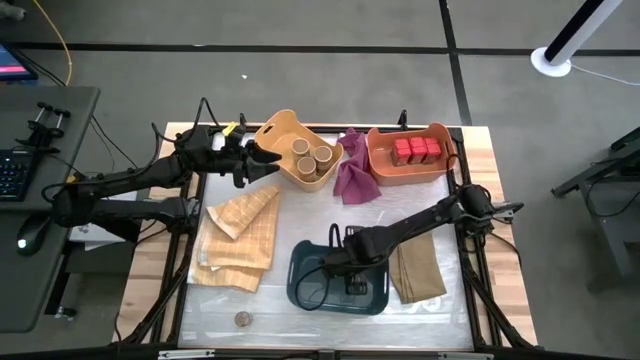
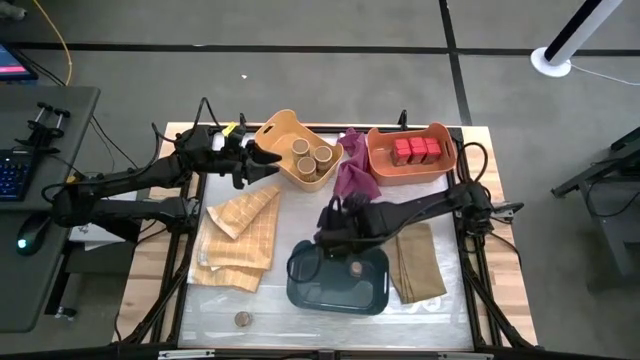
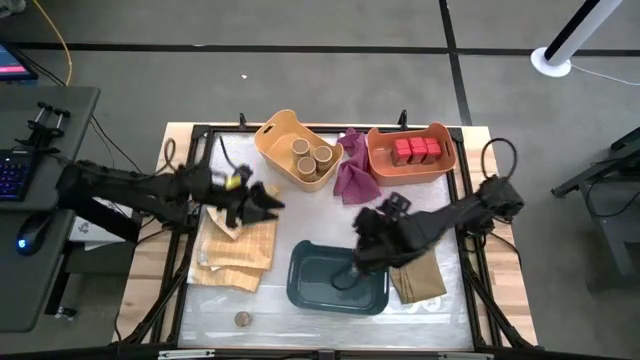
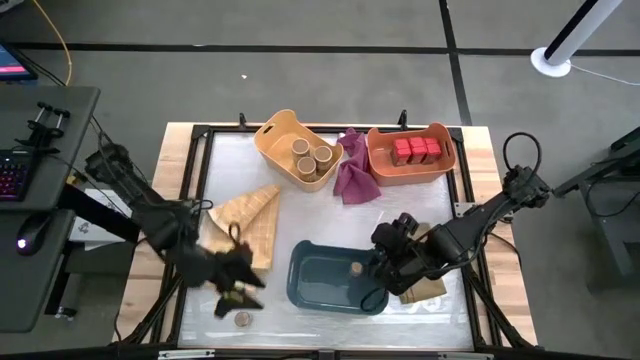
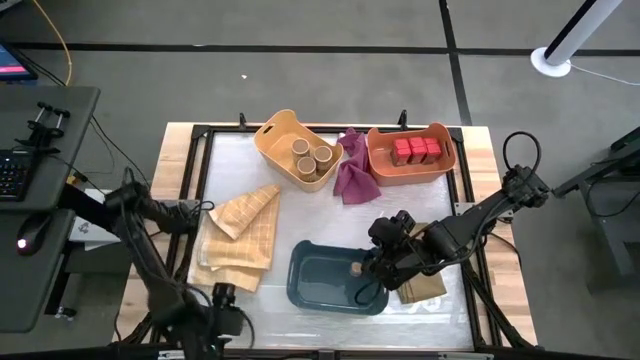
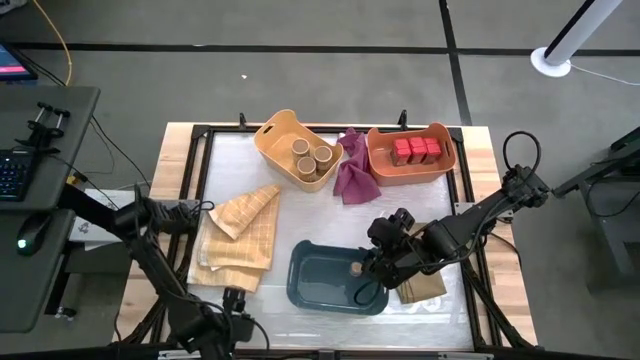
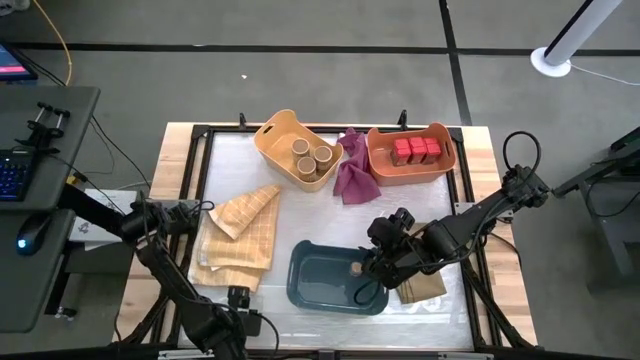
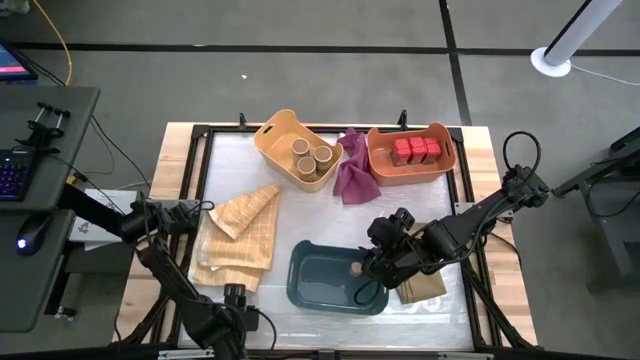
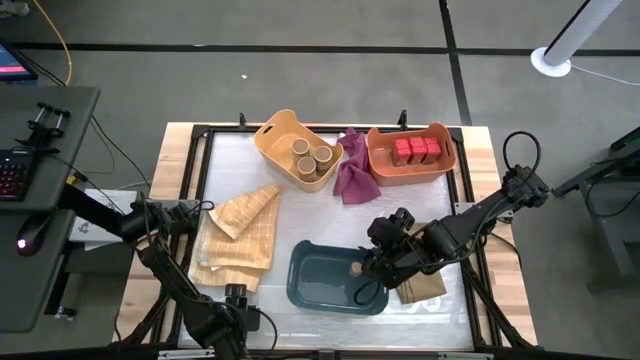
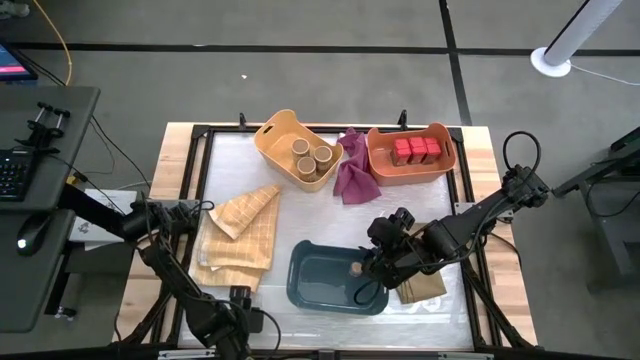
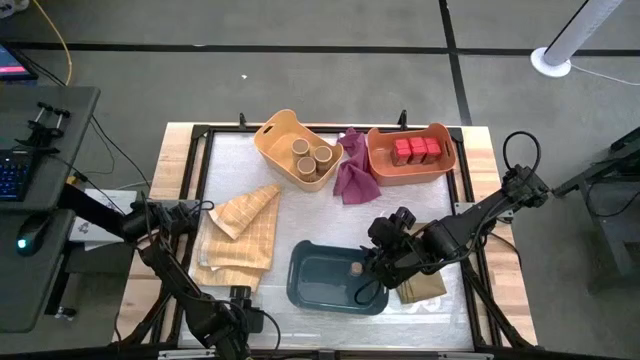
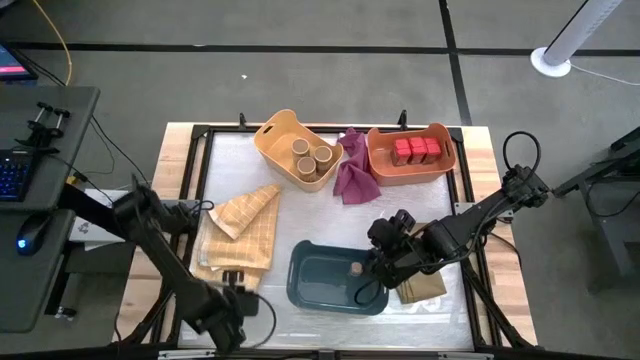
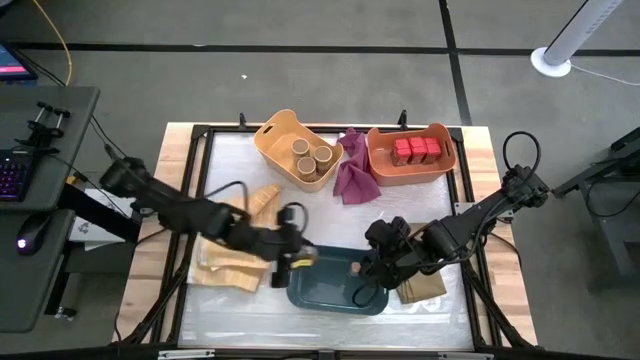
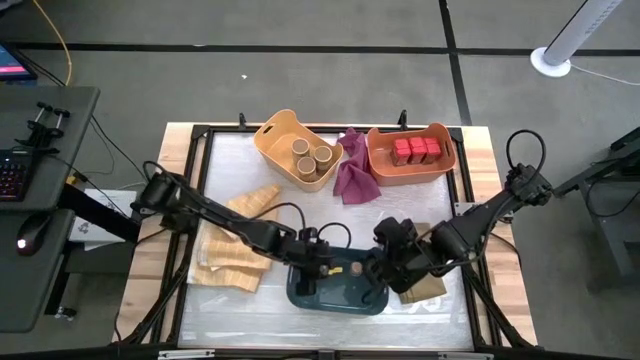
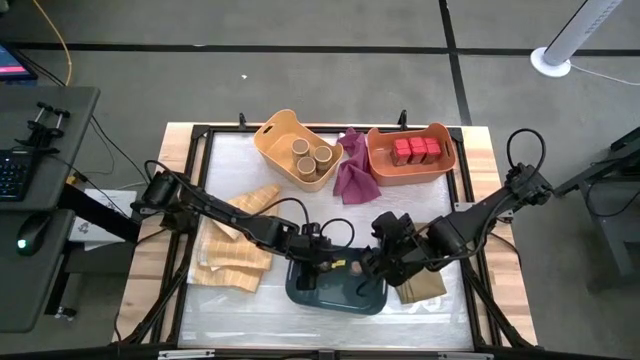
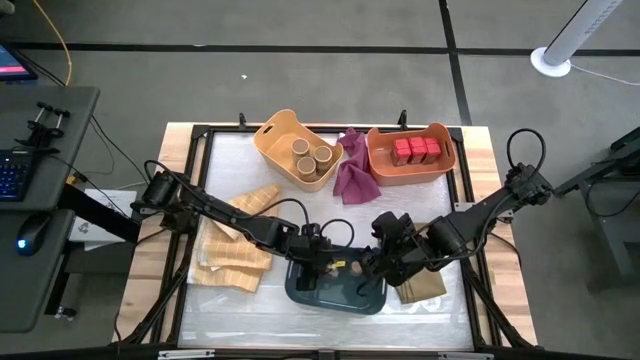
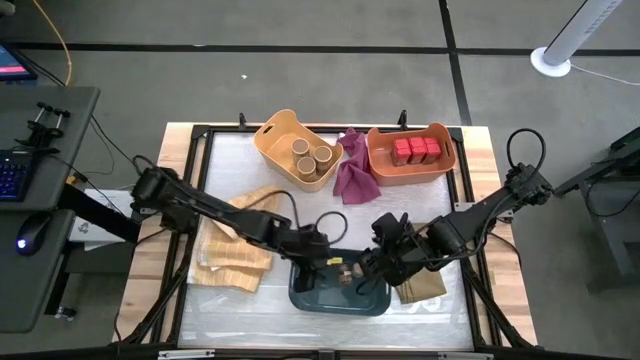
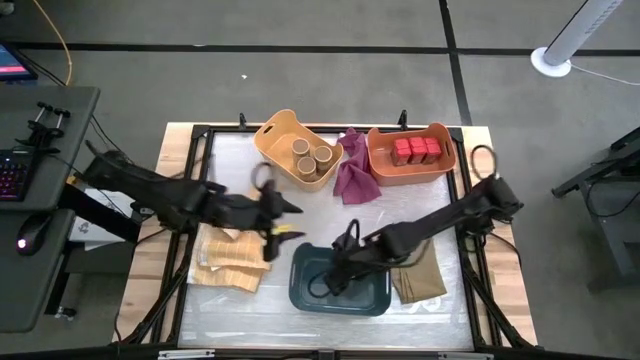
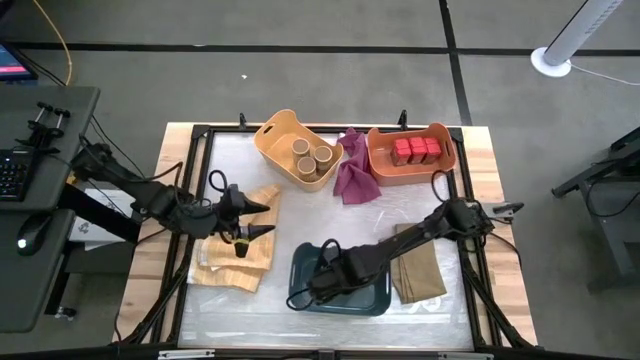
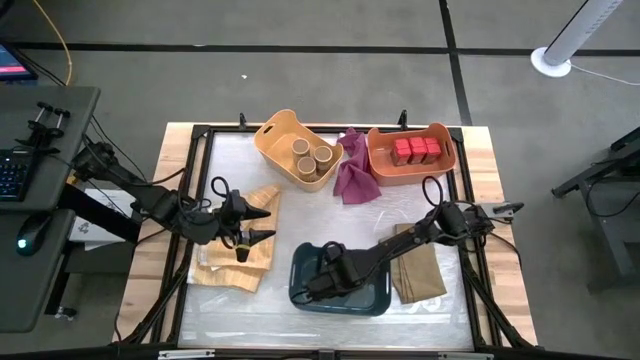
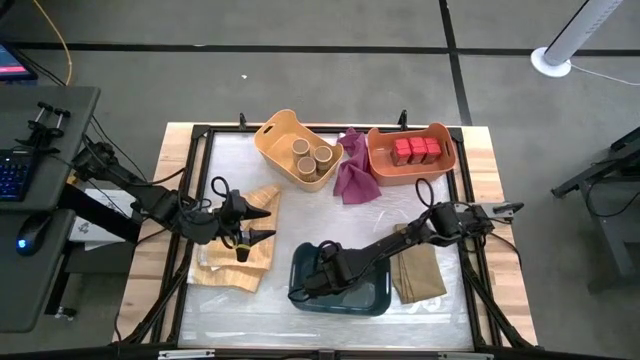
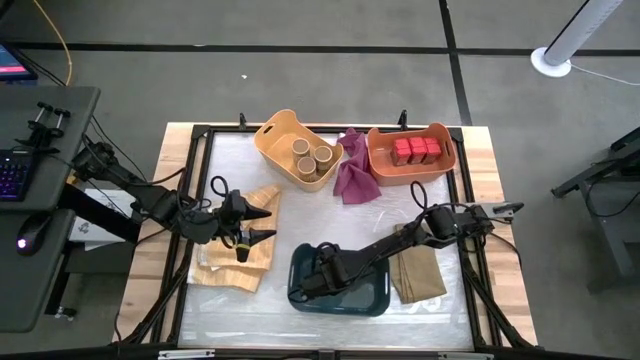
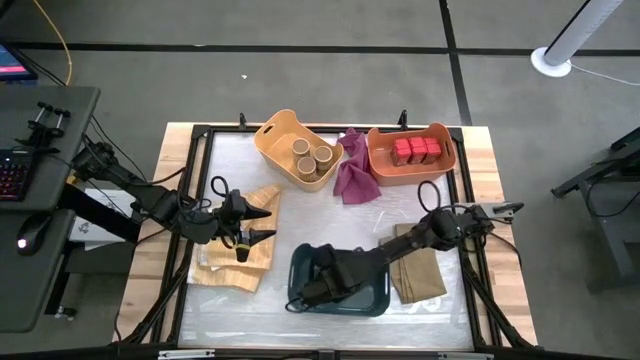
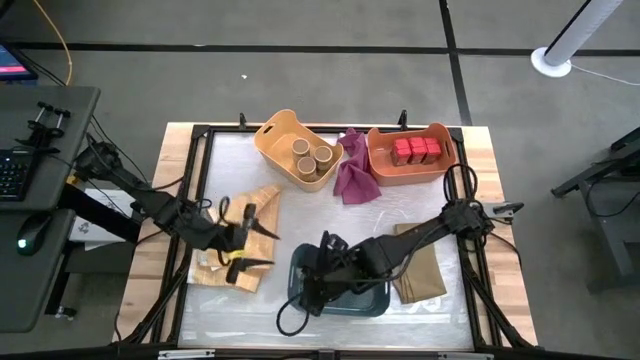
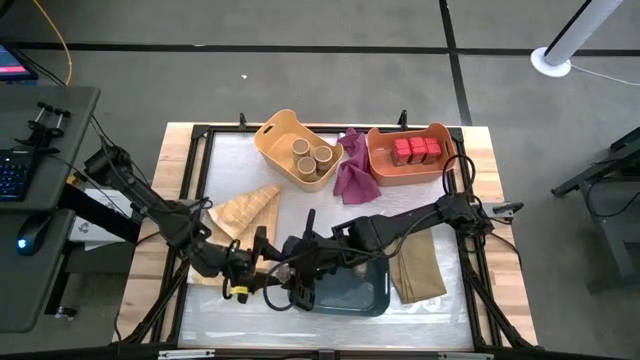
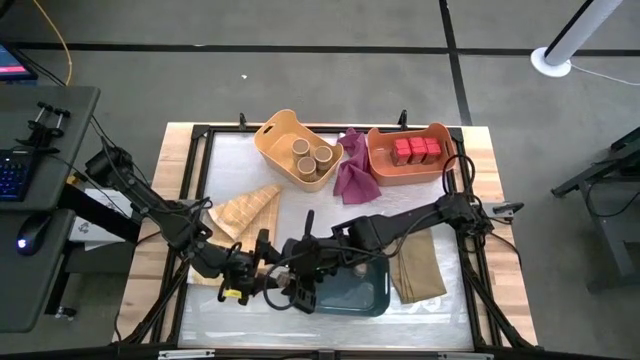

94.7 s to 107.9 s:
Task: Sort spices by type
Put the transparent seasoning bottle into the blue bin

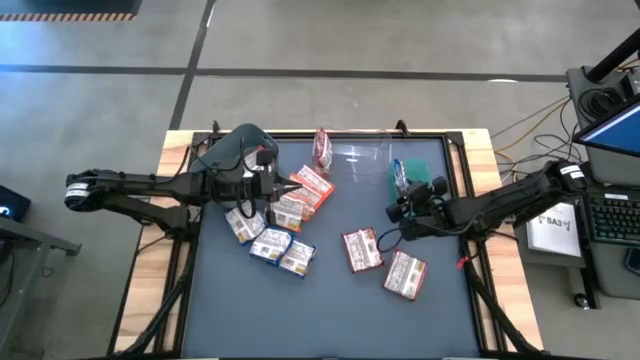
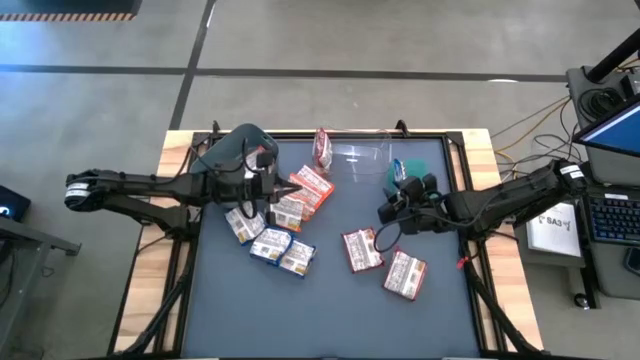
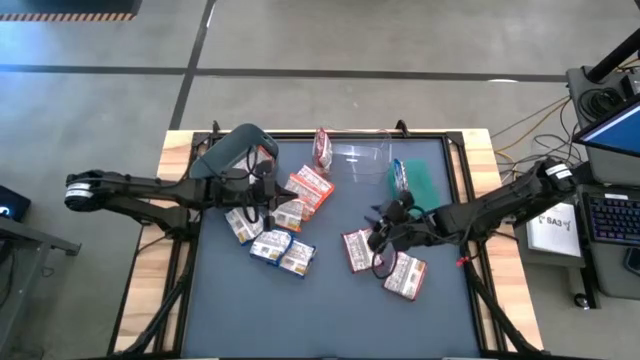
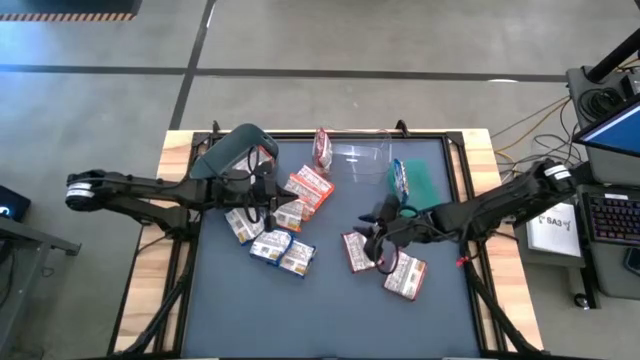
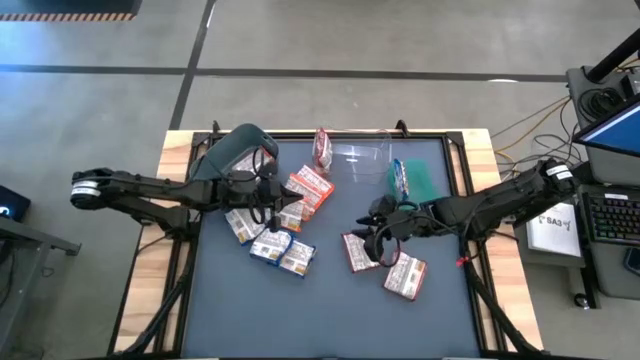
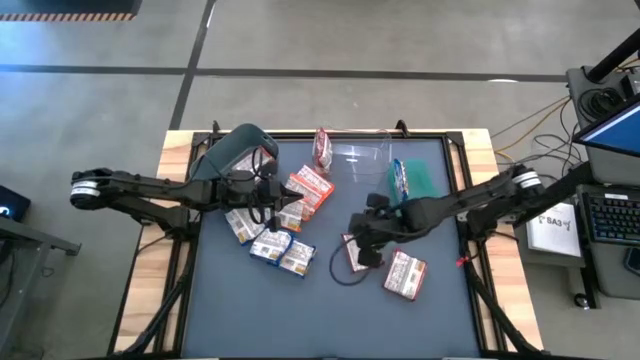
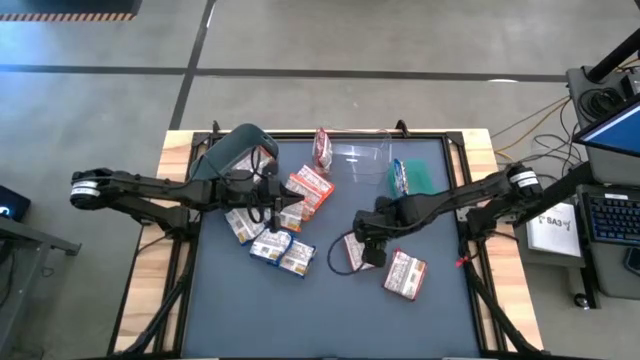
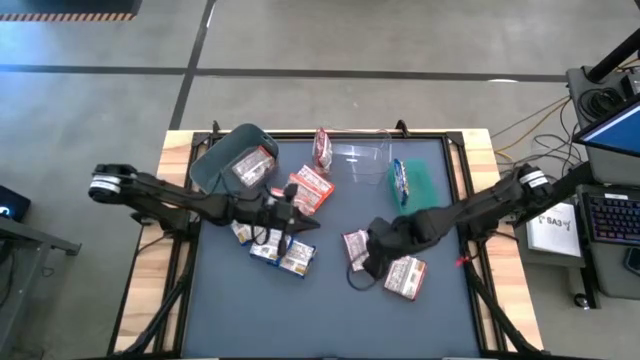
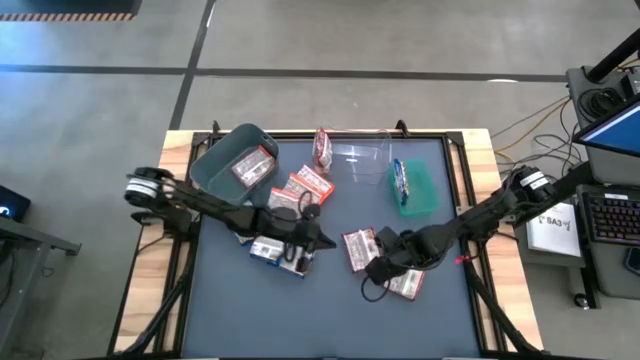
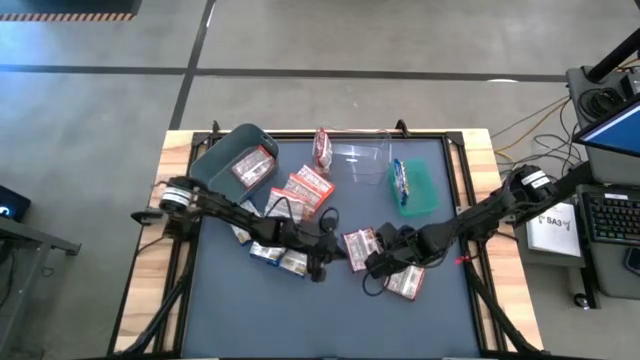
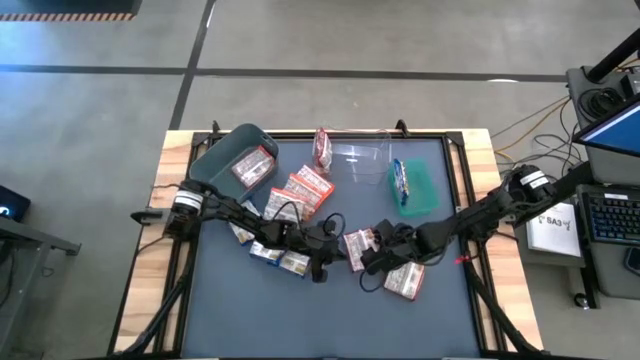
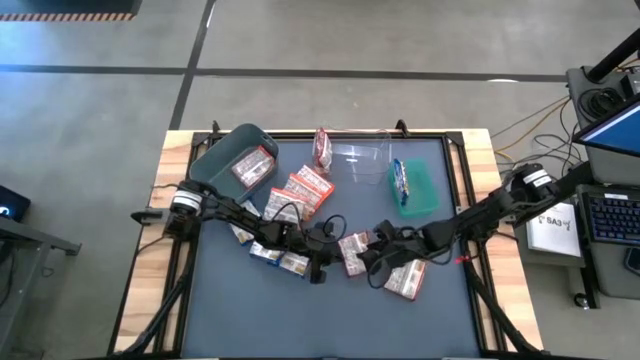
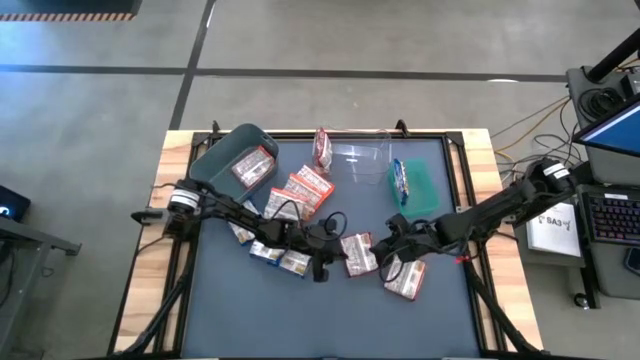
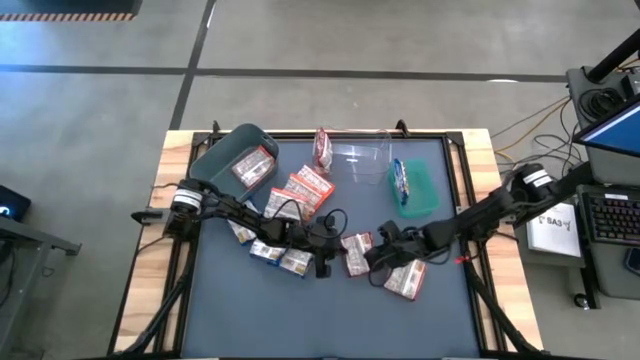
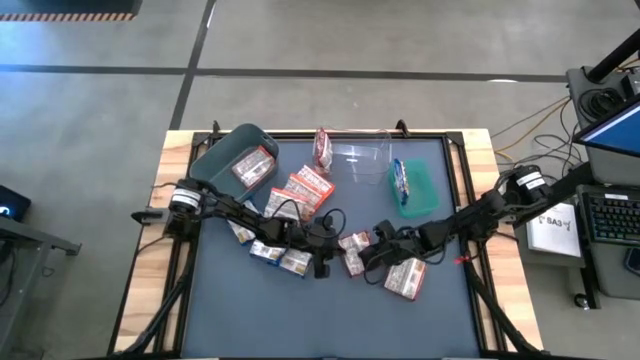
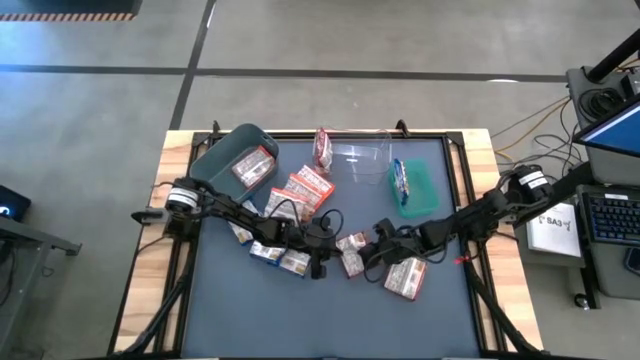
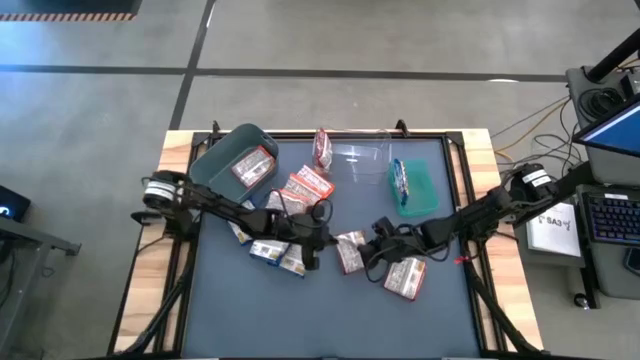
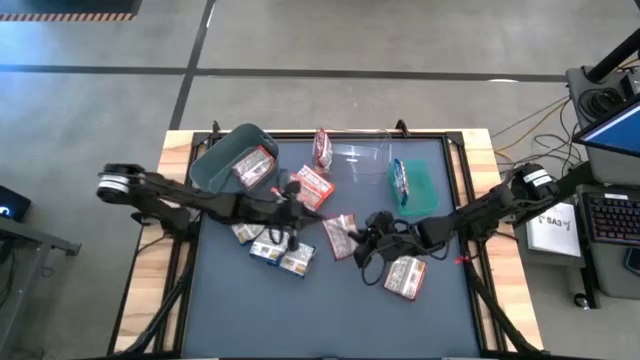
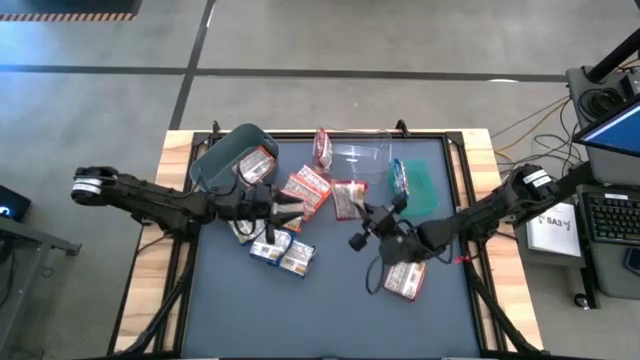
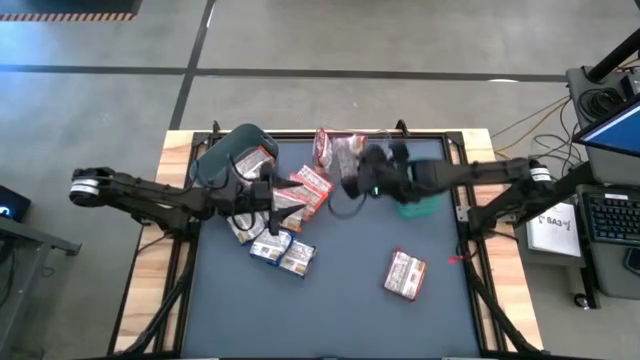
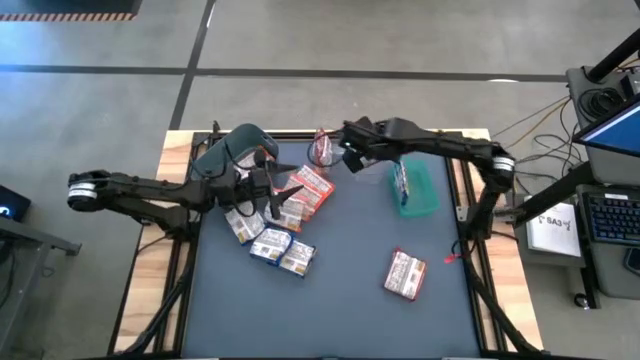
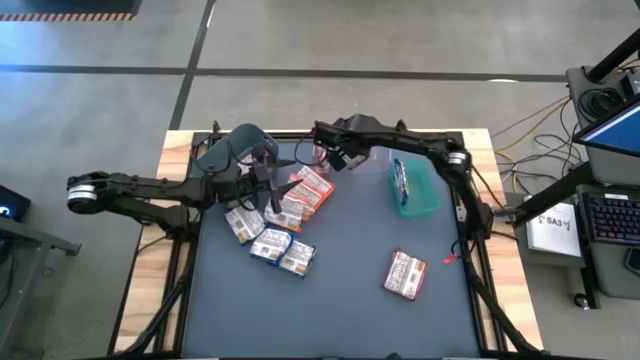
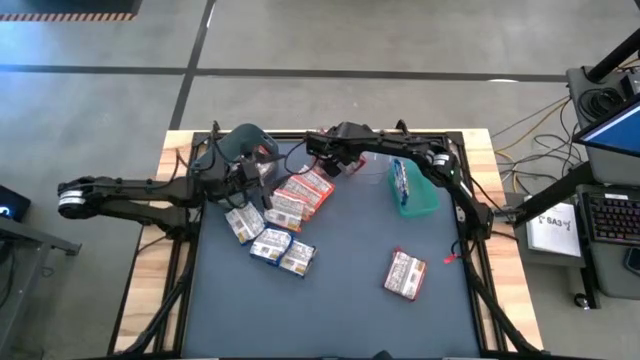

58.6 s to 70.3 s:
Task: Sort Maruchan noodles
Put the red noodle pack into the transparent bin
